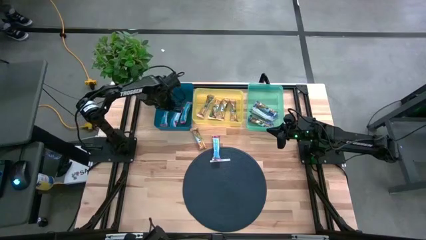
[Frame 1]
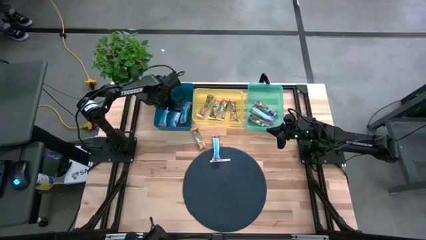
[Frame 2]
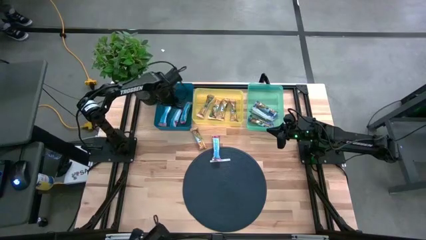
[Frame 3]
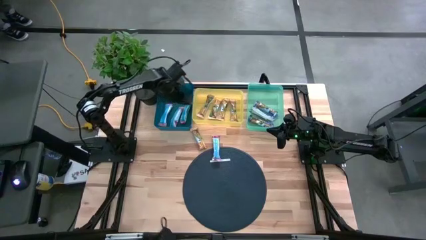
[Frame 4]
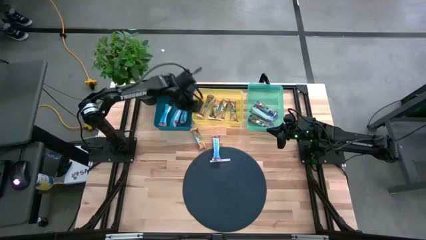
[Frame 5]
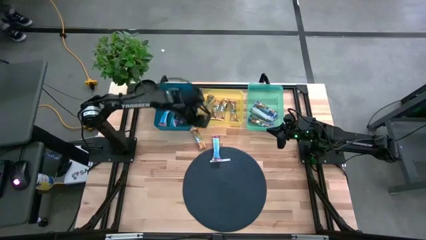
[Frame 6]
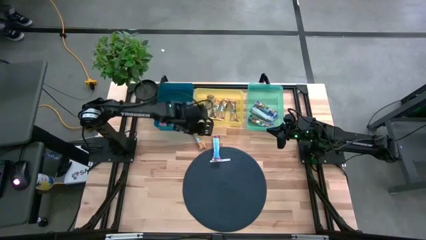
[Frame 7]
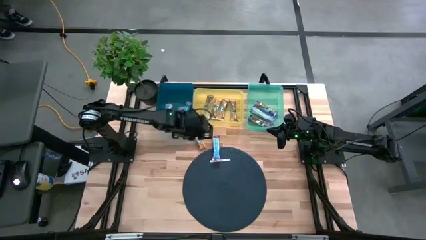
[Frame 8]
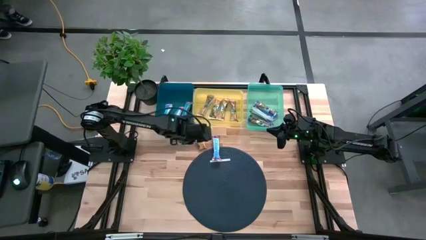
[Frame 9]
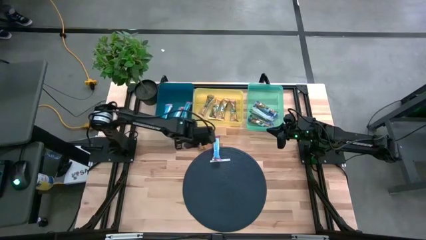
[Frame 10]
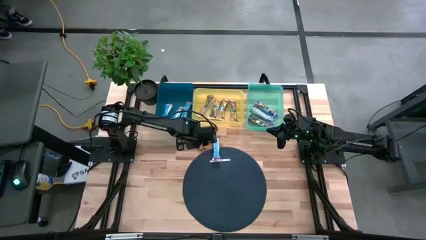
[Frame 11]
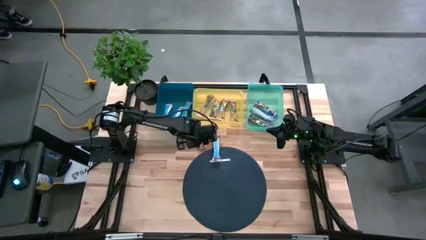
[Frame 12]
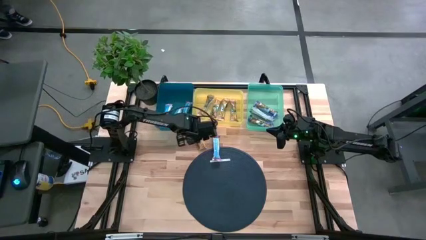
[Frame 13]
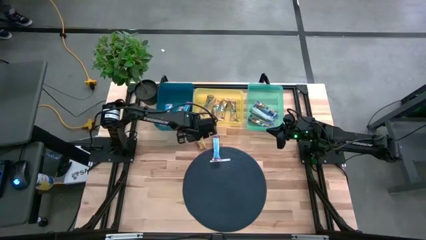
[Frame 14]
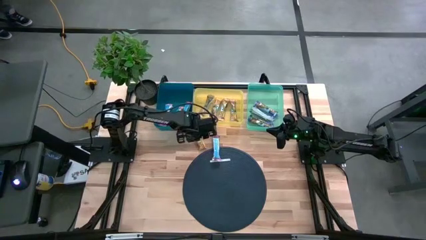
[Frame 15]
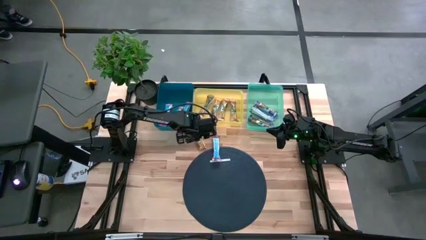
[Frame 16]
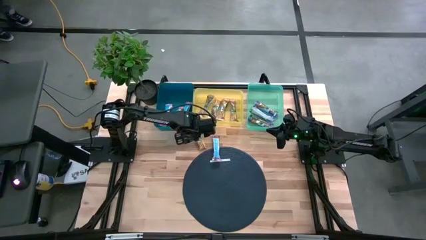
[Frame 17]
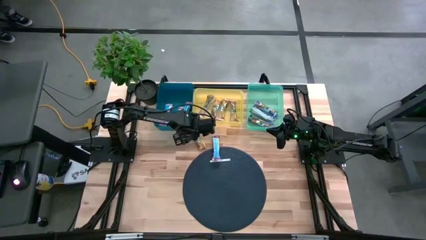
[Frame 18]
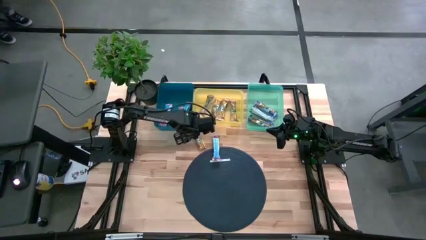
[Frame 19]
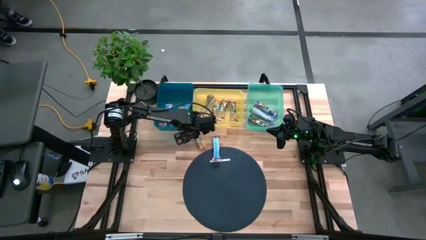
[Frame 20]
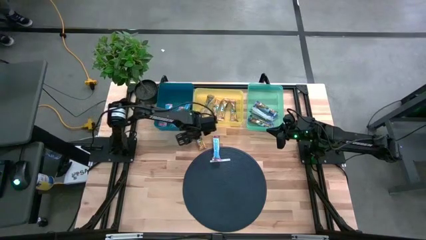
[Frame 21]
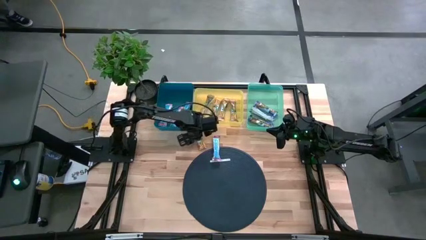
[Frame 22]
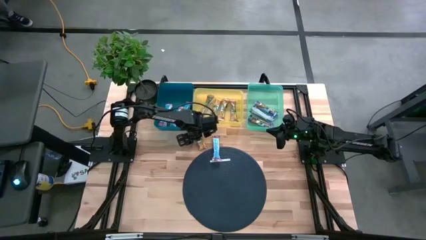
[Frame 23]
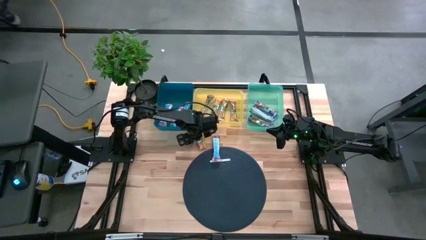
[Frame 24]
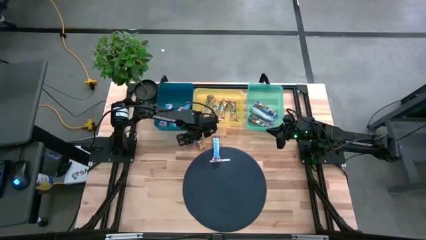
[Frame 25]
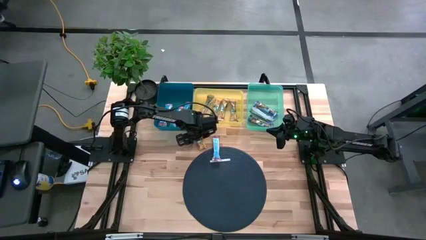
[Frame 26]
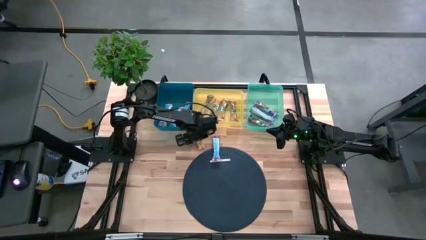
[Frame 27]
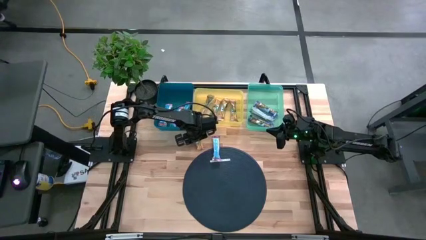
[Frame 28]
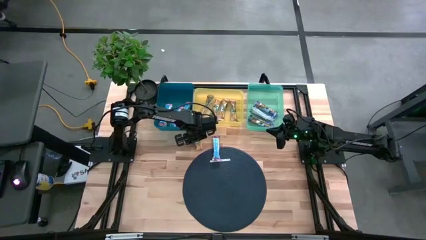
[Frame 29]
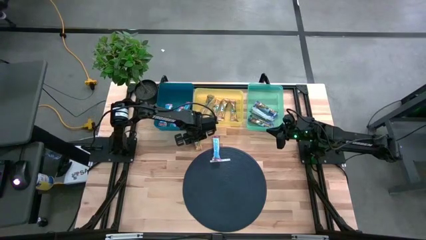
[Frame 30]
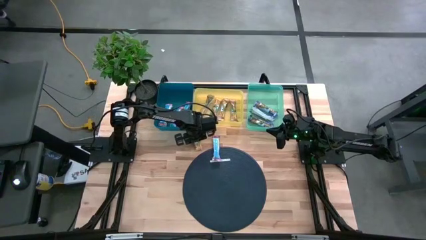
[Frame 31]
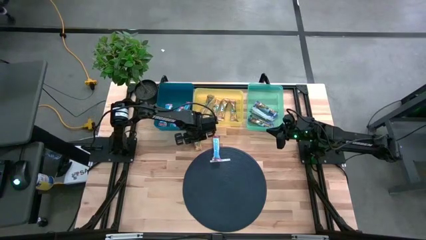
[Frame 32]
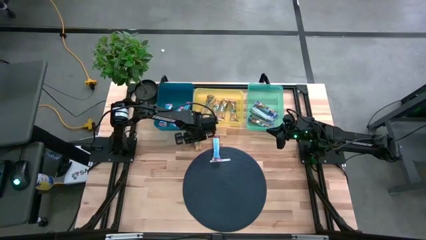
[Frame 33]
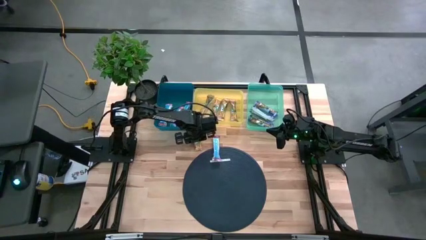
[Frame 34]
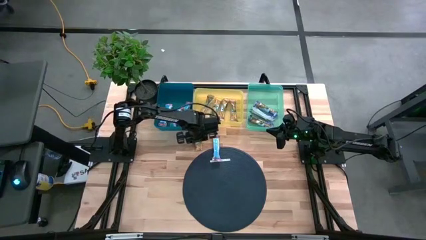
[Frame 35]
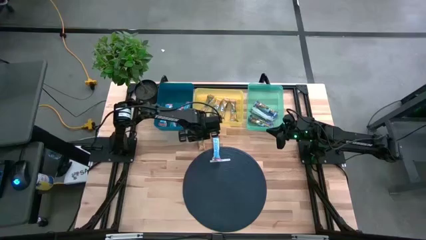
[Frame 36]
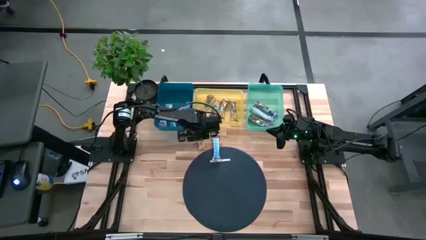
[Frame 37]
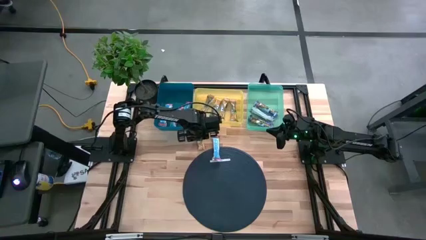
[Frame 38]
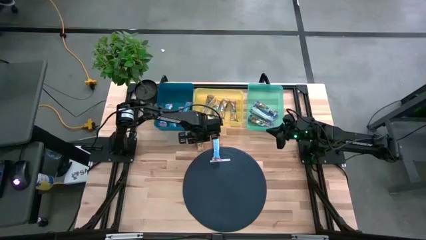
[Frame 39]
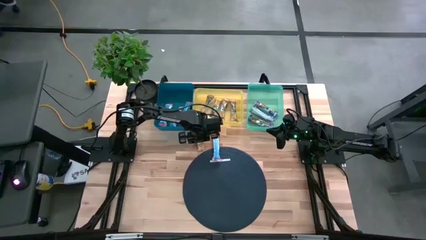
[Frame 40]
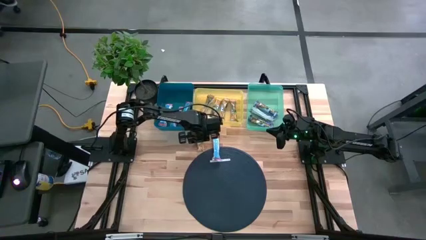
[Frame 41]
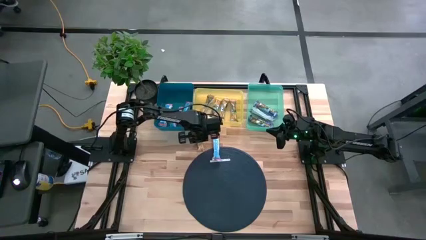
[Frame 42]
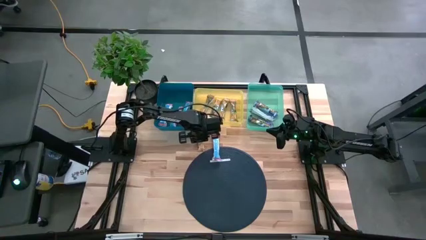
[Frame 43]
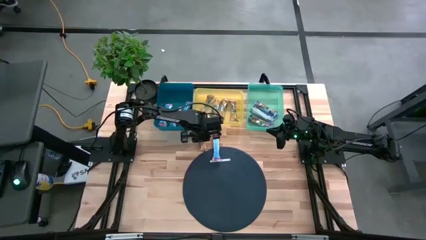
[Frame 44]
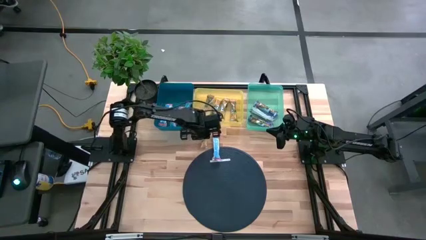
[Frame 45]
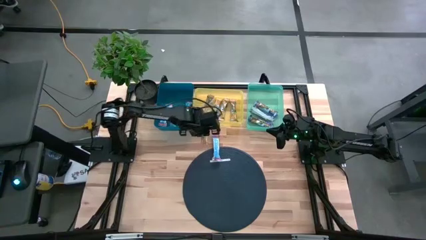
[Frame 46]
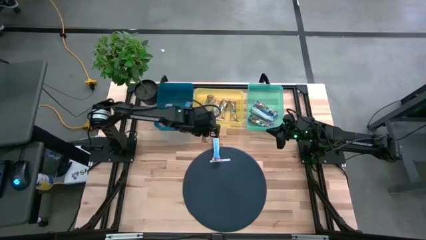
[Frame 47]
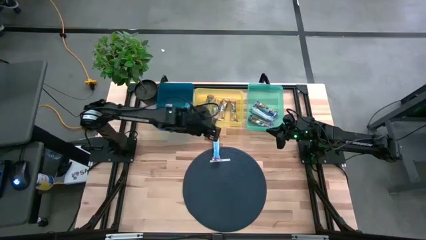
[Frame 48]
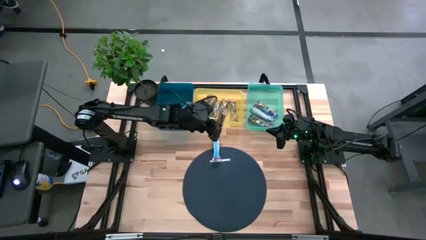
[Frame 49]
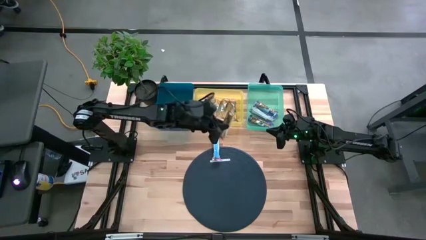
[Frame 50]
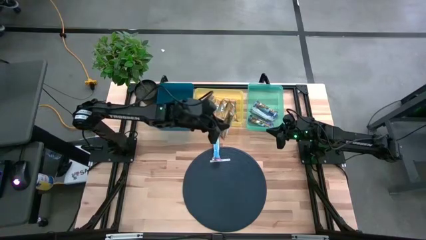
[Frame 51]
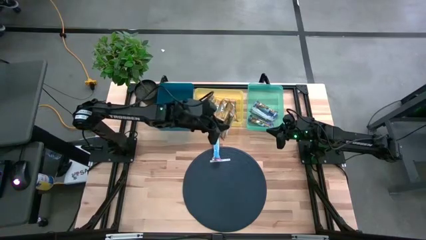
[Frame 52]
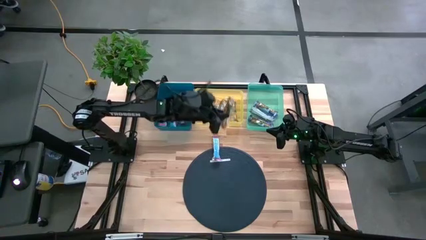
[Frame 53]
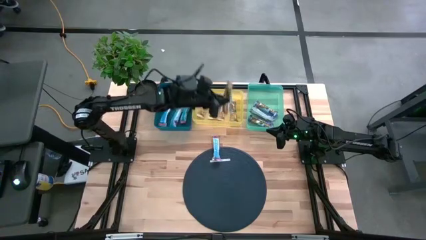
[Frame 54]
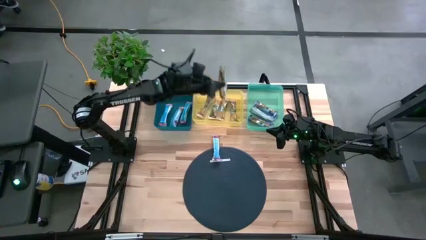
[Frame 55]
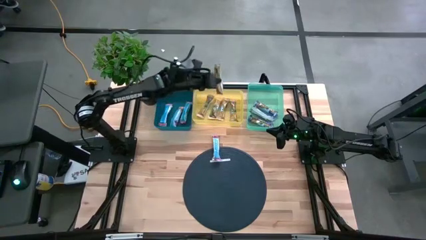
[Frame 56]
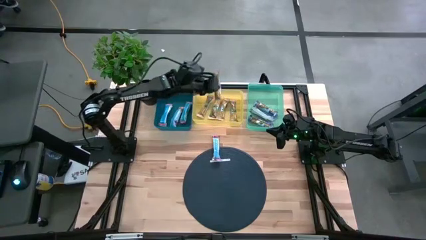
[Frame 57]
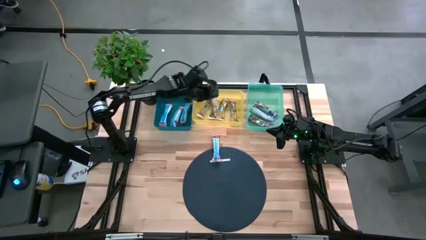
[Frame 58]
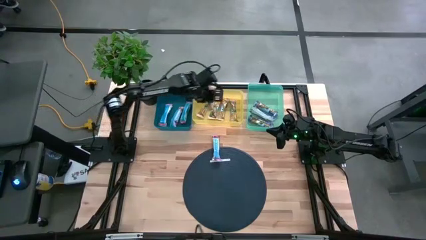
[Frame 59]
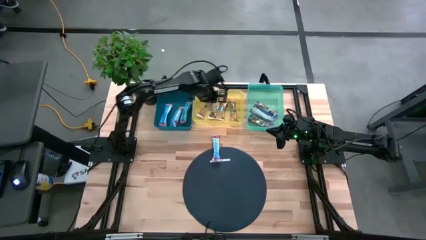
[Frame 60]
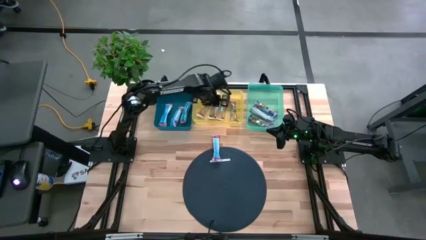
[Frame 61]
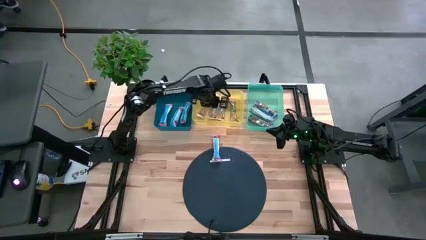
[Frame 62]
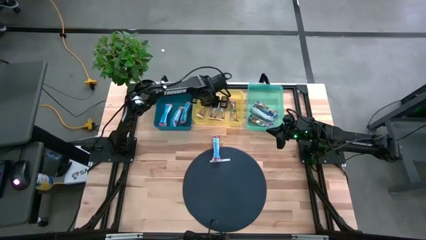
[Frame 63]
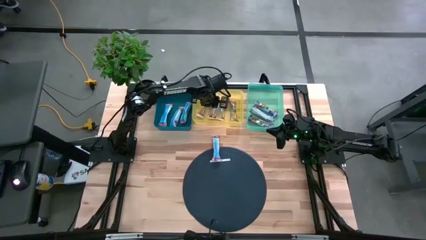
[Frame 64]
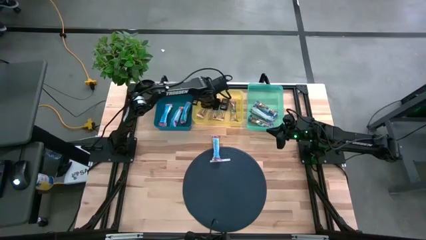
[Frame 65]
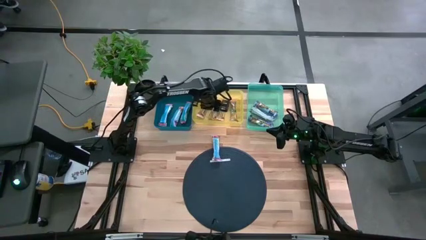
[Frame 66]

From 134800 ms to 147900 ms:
Task: Pick and place Granola Bars by type
Put the orange granola bar into the yellow bin

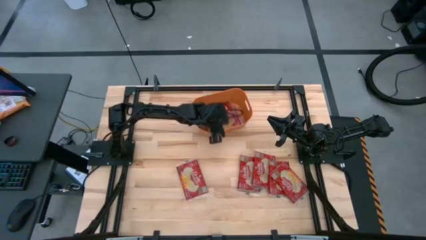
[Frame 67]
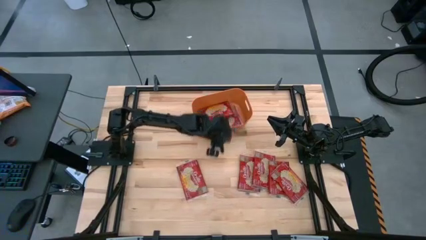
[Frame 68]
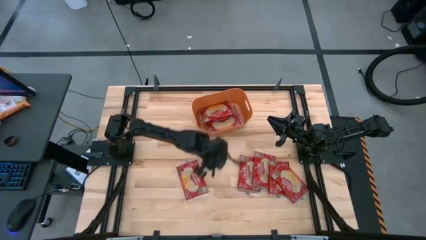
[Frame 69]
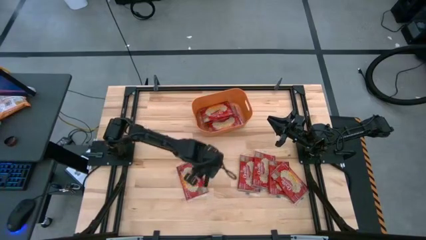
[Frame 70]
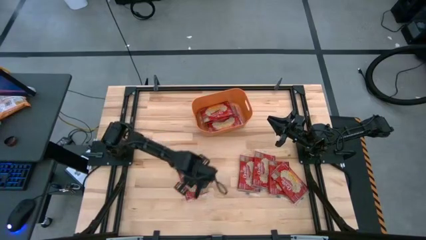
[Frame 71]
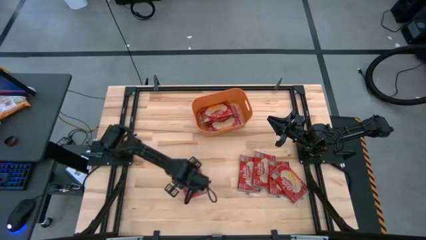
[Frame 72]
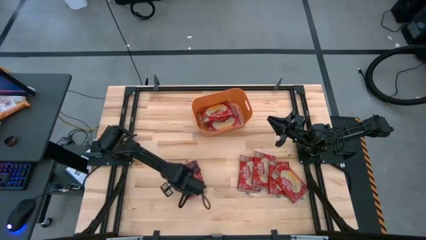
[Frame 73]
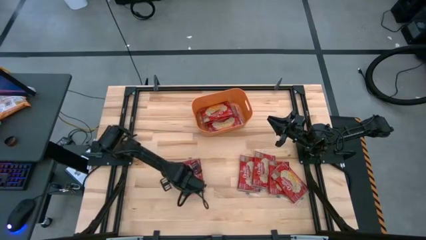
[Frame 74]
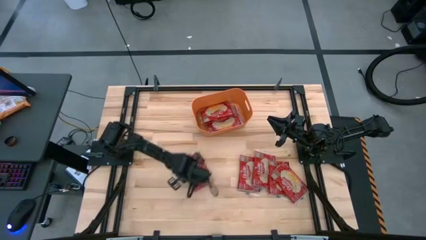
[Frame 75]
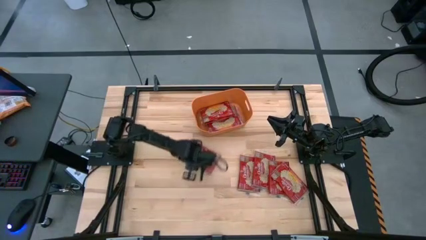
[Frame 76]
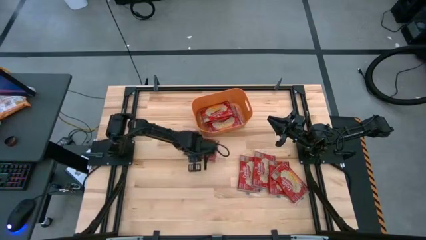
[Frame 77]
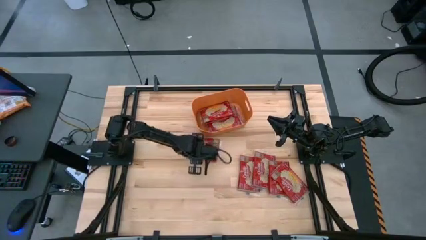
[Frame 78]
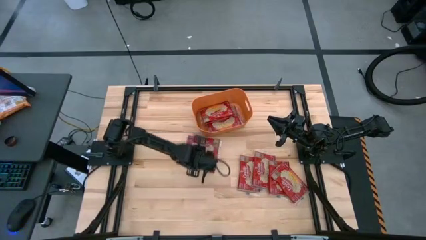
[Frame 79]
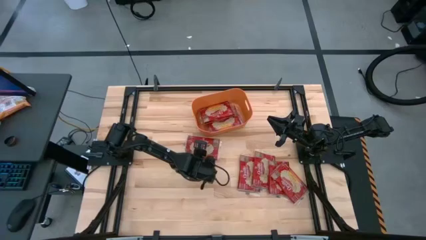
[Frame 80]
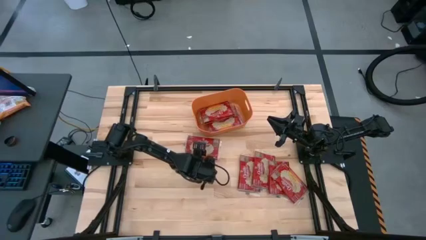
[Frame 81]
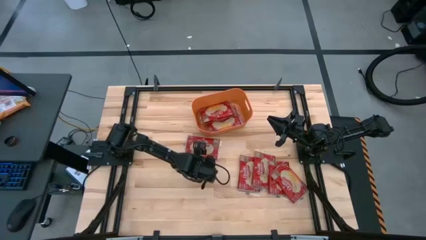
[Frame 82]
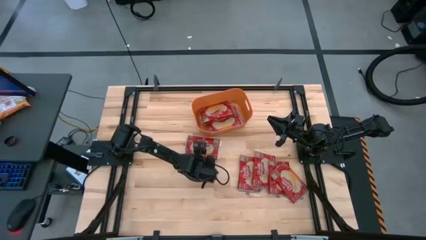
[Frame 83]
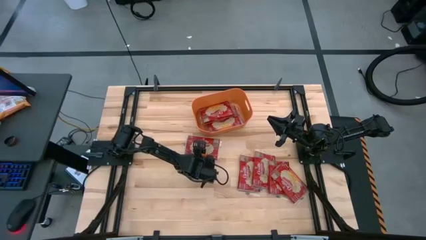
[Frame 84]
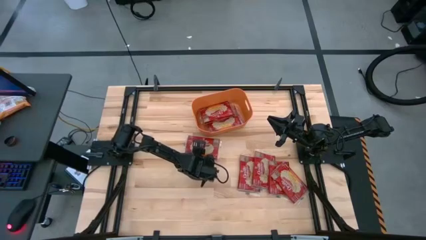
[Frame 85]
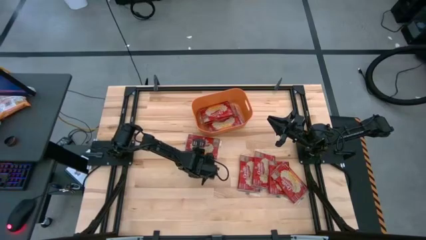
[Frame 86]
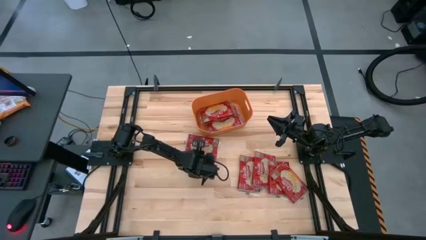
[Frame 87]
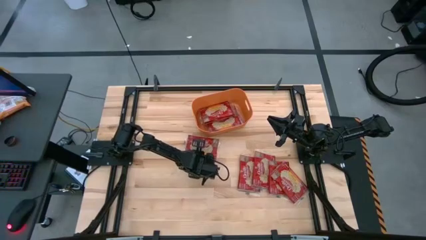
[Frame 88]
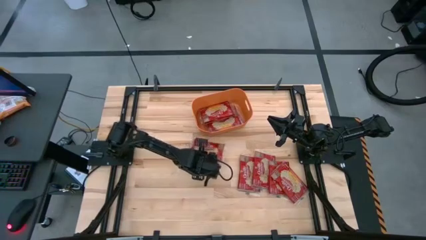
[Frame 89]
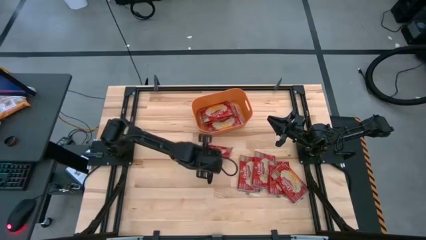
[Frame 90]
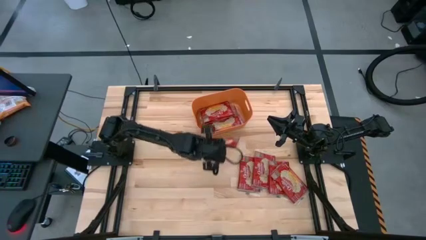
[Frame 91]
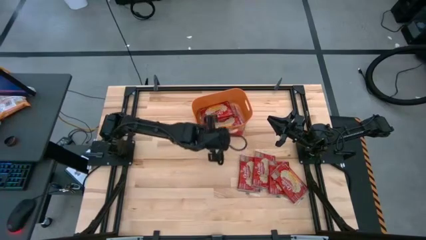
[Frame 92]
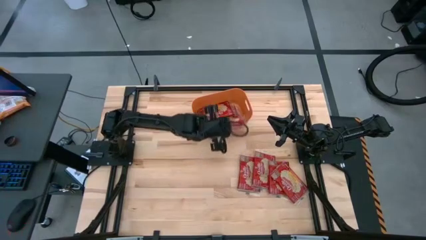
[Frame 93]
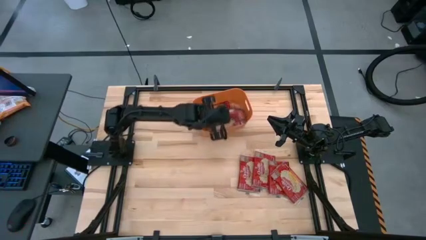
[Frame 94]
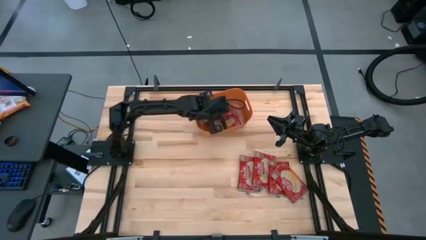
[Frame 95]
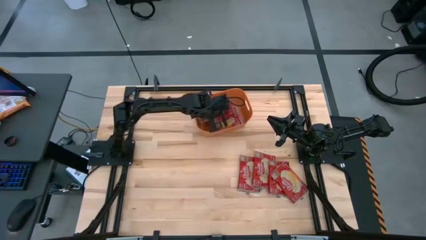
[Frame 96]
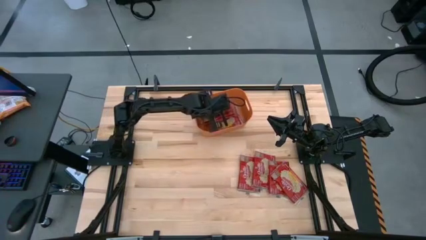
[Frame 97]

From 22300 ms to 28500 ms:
Task: Sort popcorn bags into baskets
Put the red popcorn bag into the orange bin
